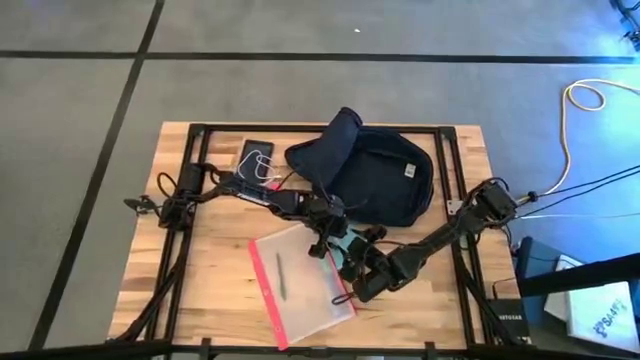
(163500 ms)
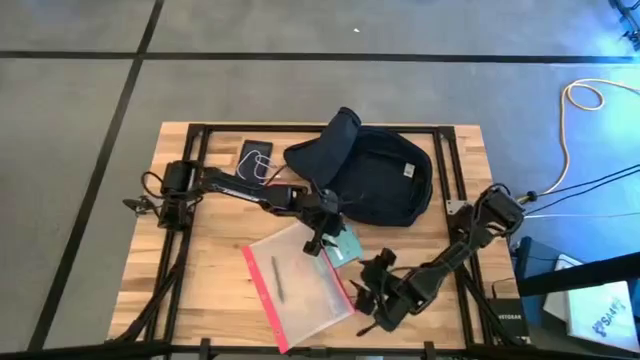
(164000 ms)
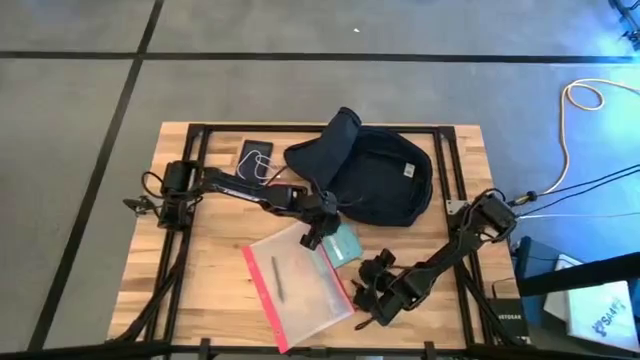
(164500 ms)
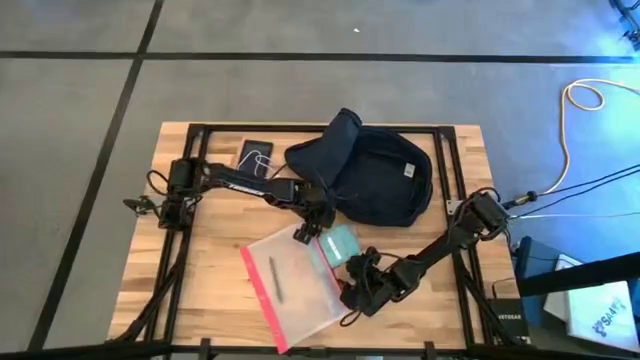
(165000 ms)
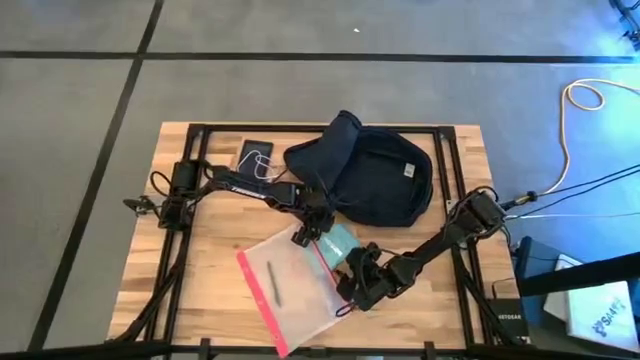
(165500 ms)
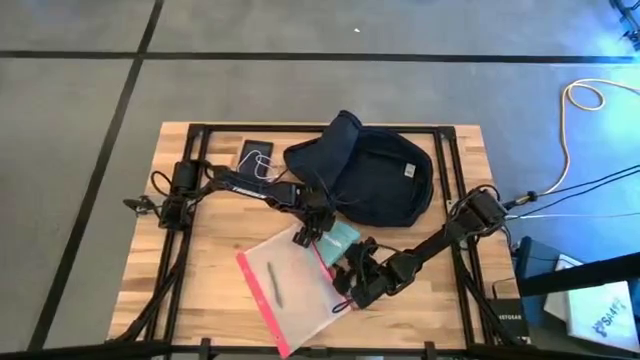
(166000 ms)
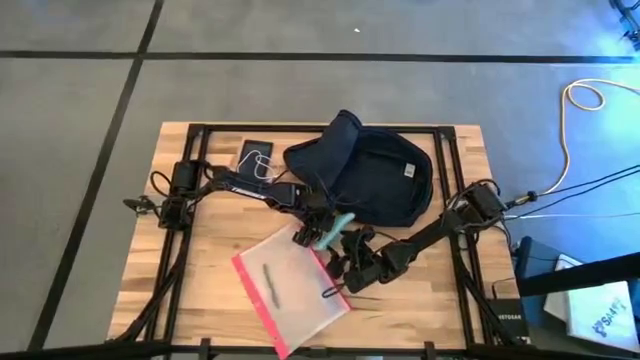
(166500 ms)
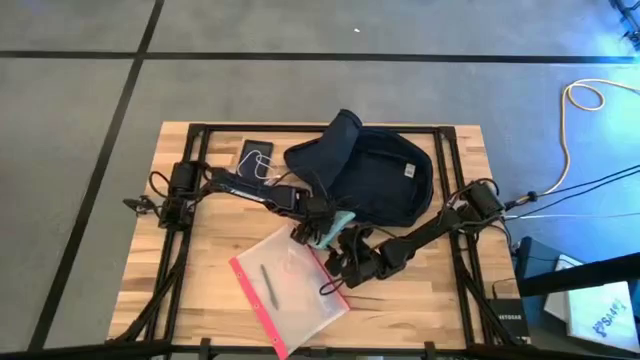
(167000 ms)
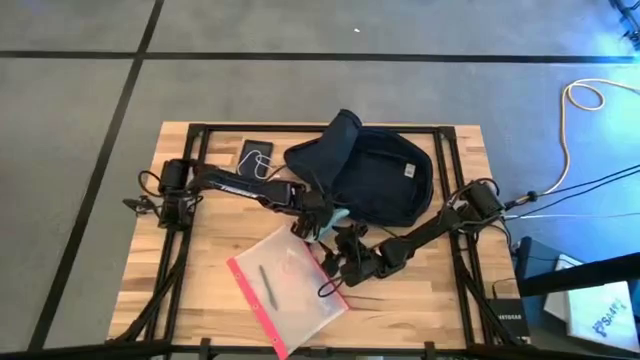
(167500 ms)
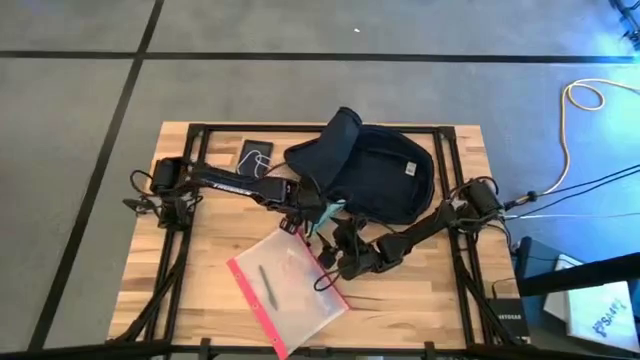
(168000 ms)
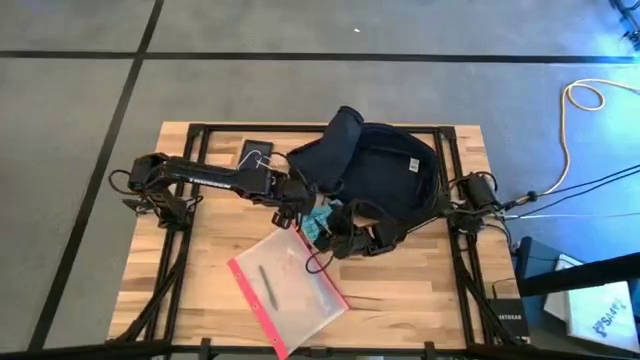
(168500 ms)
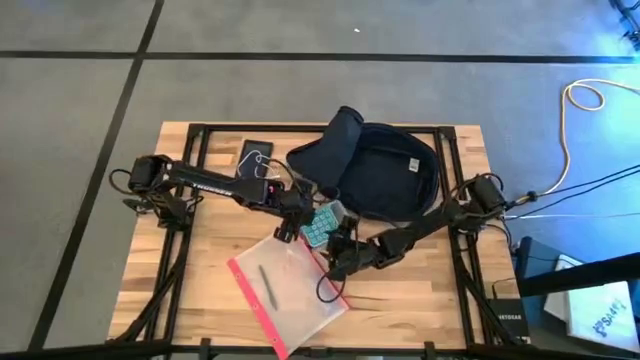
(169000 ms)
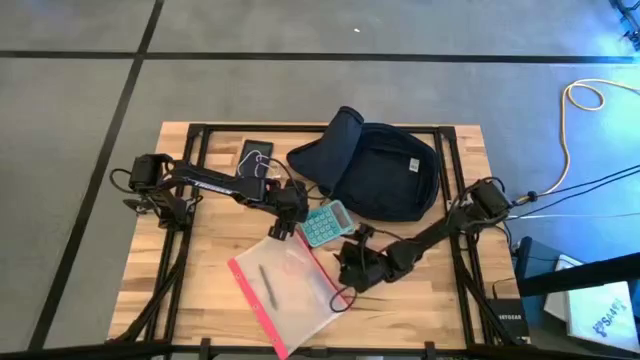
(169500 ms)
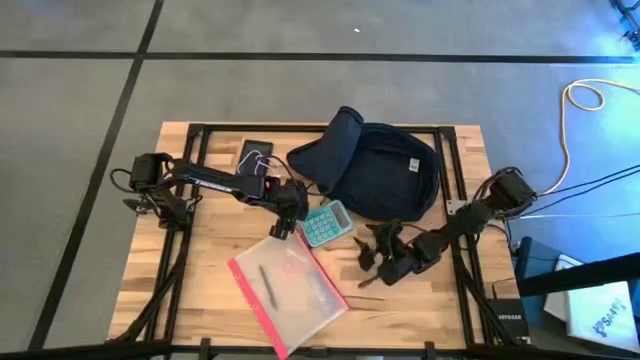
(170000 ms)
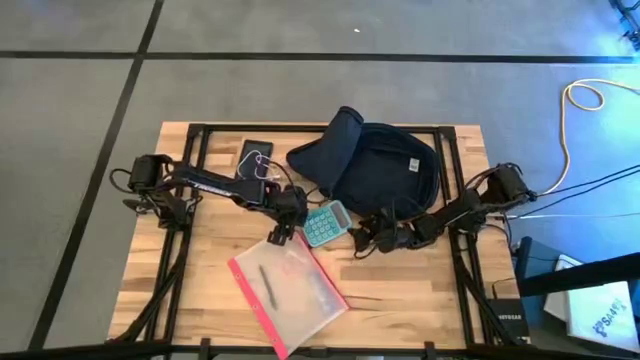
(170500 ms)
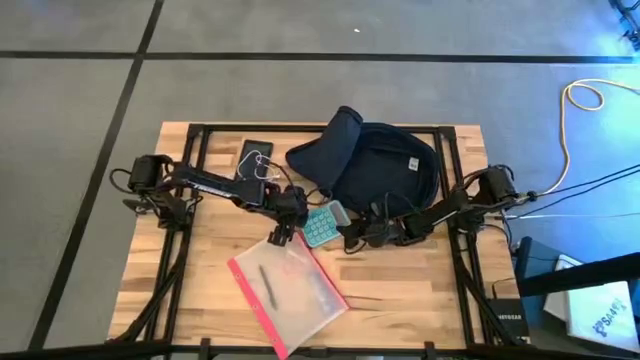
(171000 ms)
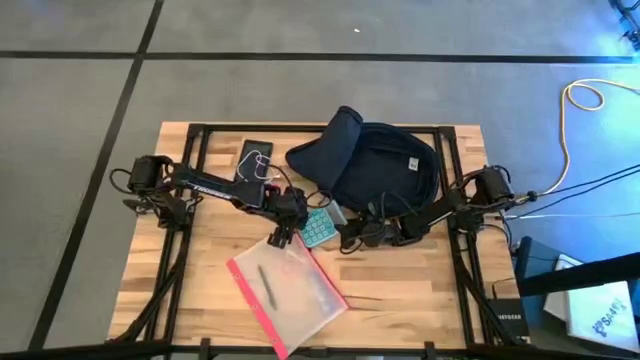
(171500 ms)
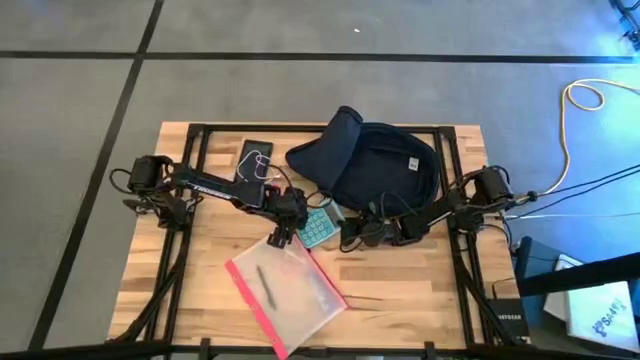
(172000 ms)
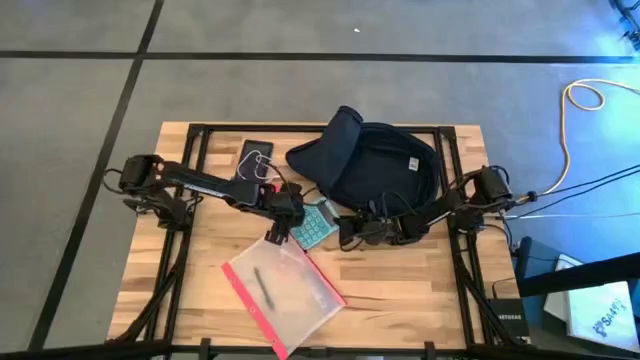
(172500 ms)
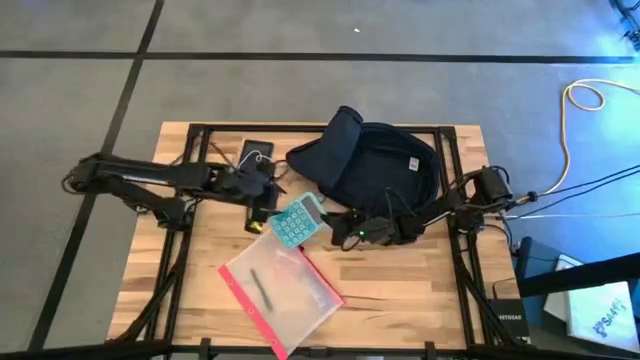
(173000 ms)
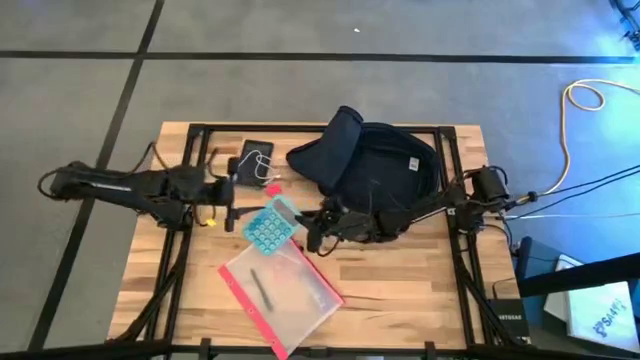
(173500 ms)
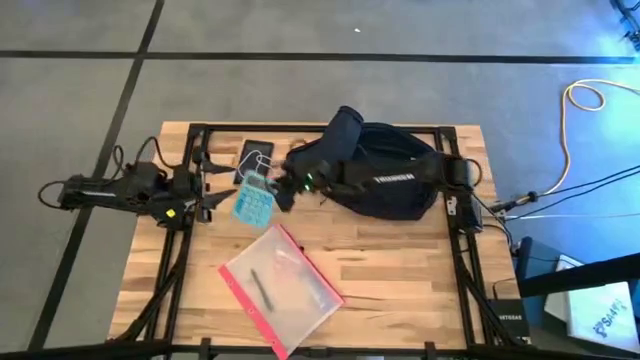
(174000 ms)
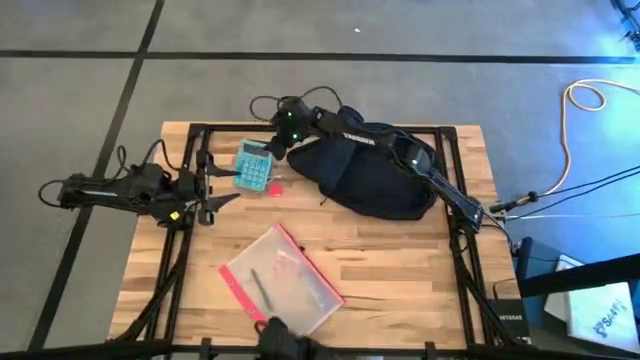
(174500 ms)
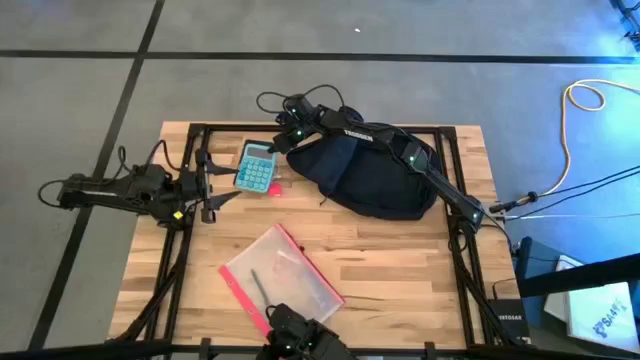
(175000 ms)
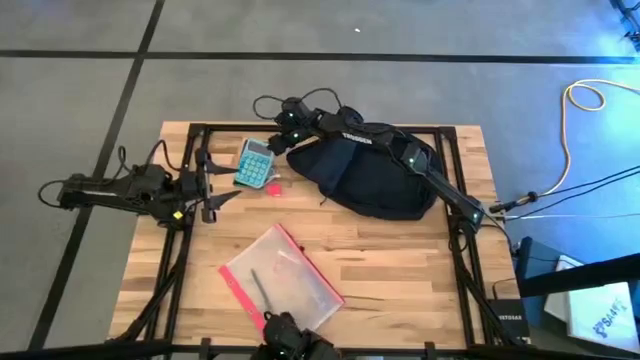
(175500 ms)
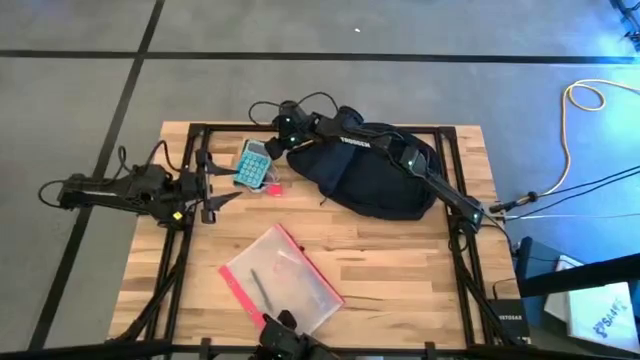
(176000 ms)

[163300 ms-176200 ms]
Task: Unpack backpack
Remove the blue calculator from the transparent zip bag

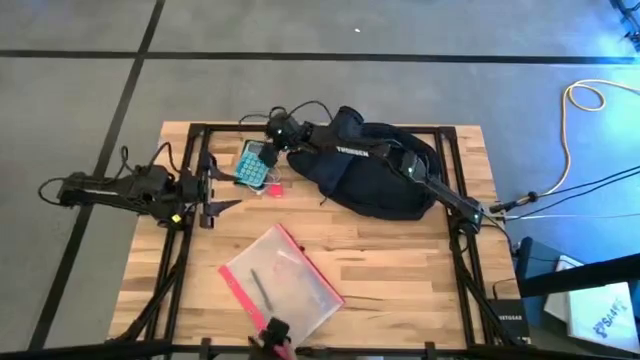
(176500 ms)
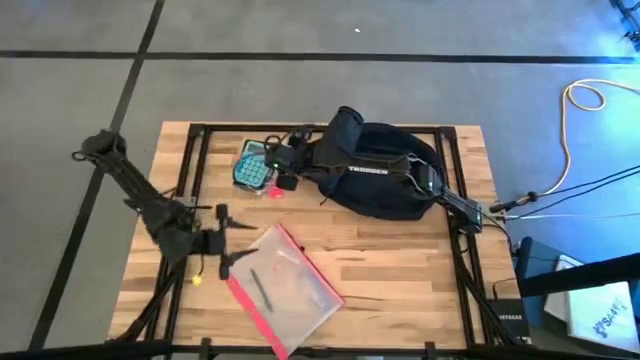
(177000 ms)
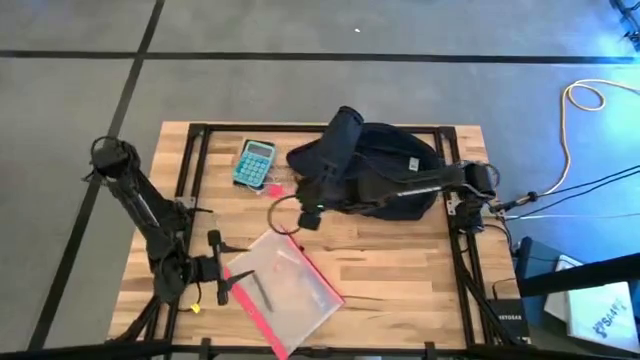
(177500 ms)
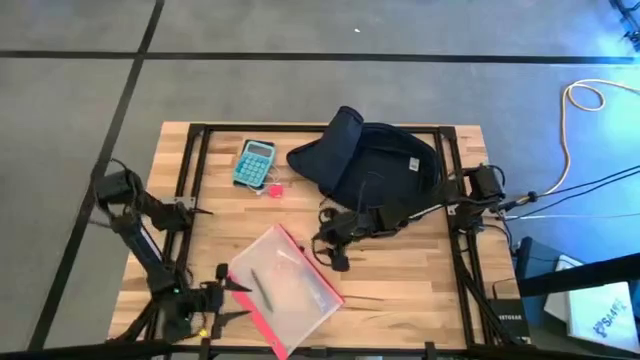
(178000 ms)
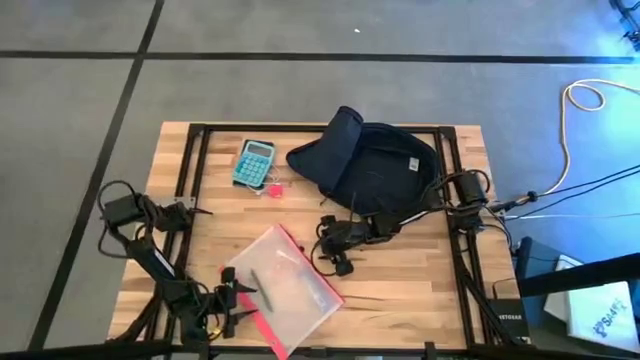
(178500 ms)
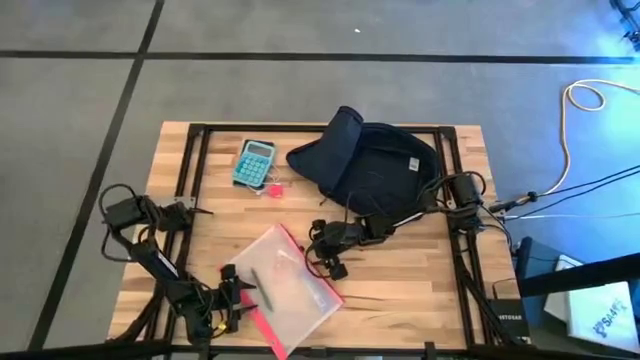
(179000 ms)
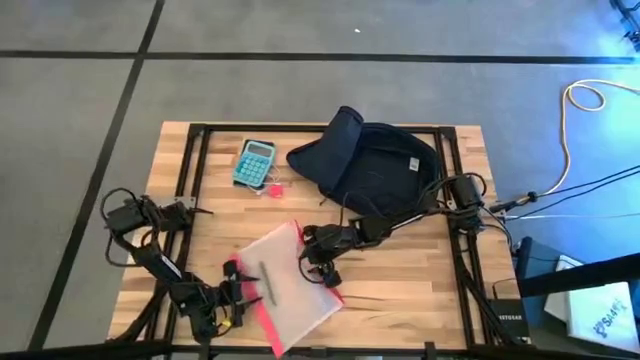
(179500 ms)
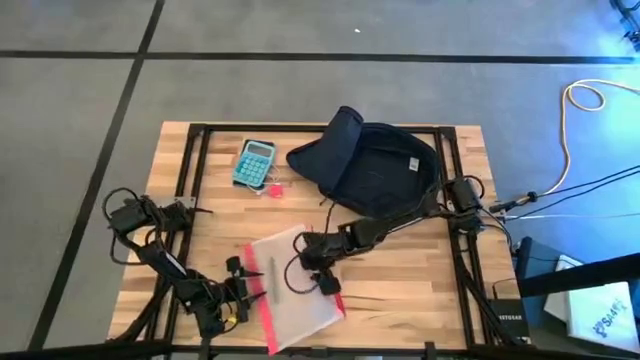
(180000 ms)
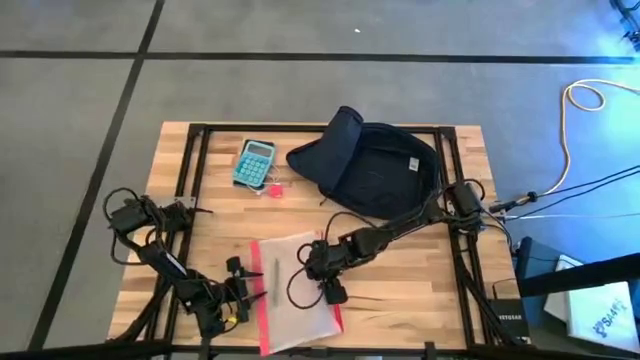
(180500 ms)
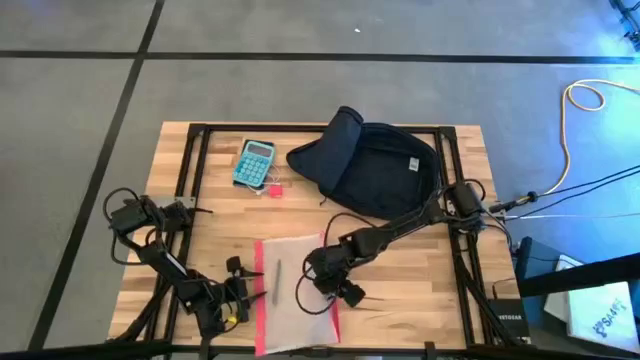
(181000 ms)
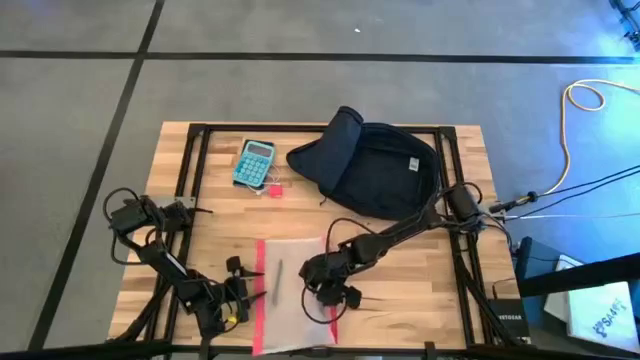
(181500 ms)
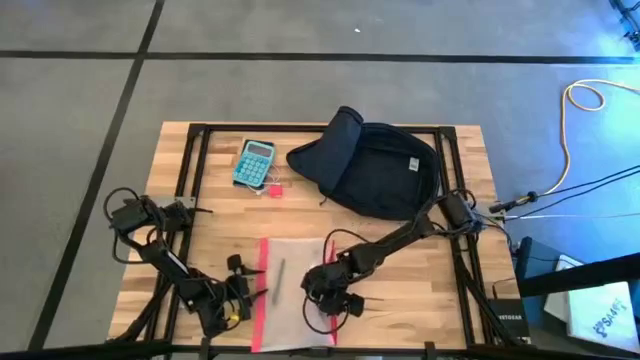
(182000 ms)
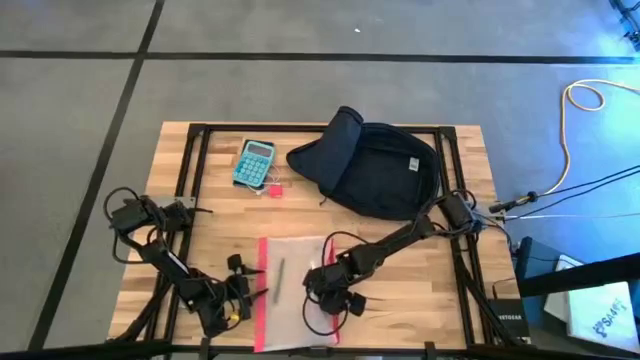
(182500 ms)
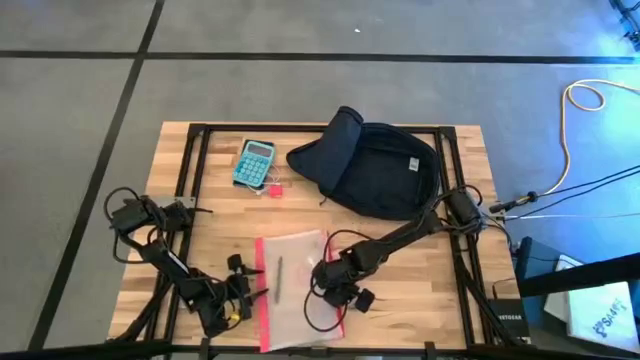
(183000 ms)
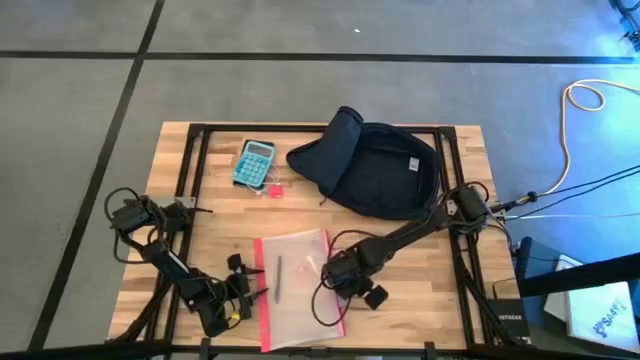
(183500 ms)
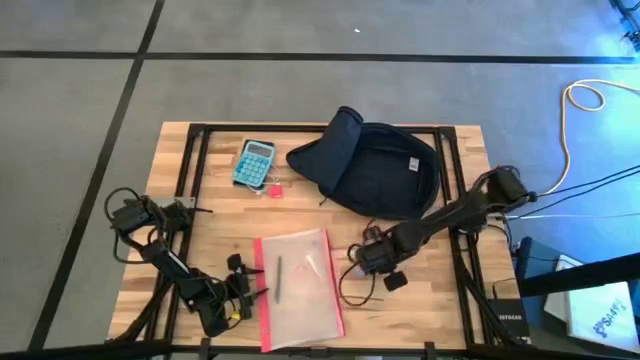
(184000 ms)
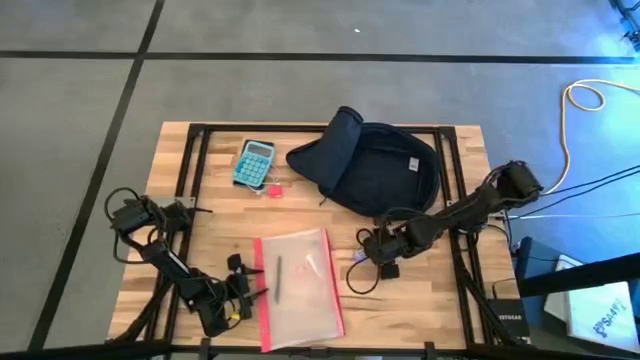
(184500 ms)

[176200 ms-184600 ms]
Remove the purple chocolate bar from the transparent zip bag
